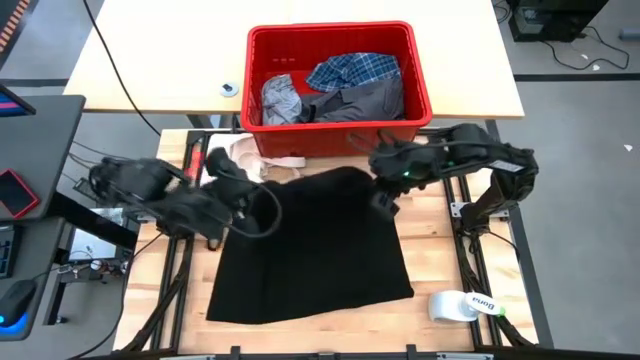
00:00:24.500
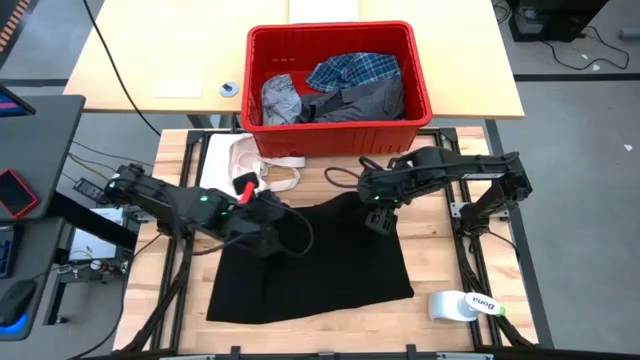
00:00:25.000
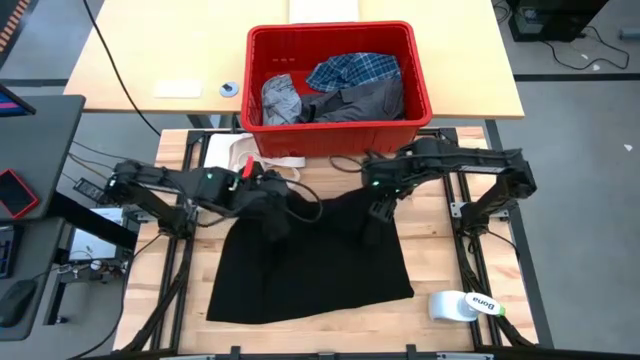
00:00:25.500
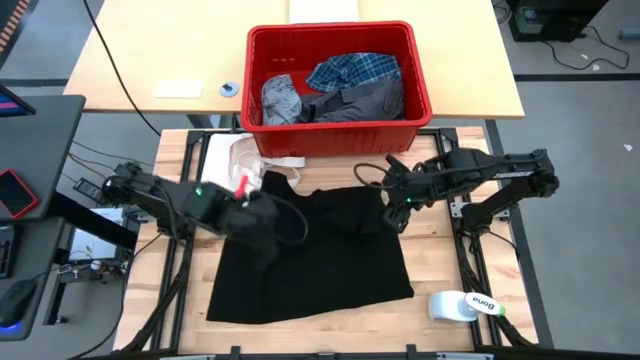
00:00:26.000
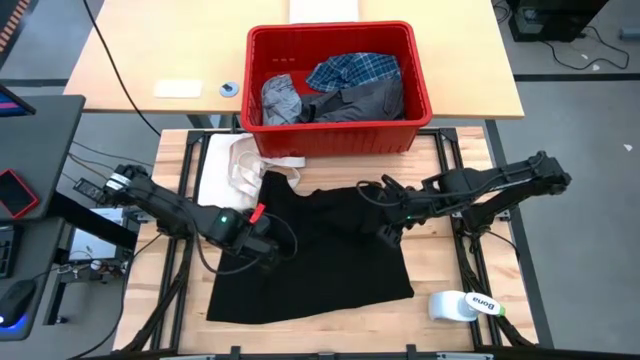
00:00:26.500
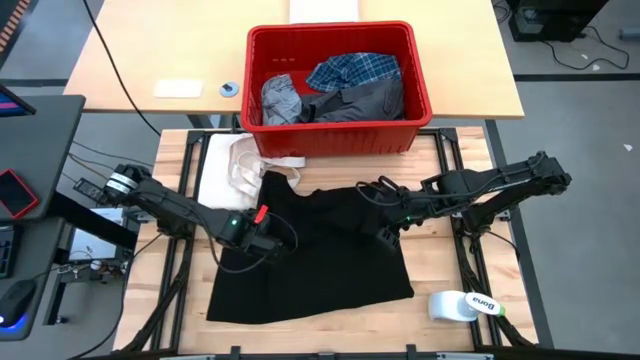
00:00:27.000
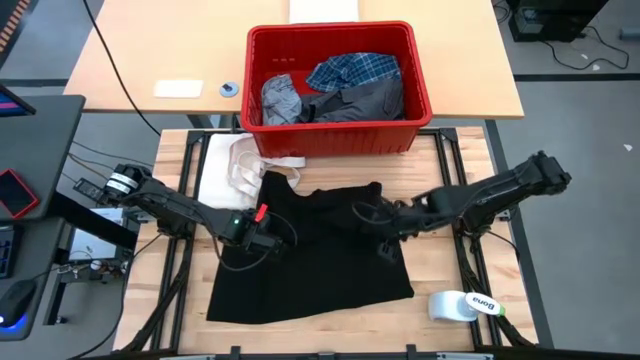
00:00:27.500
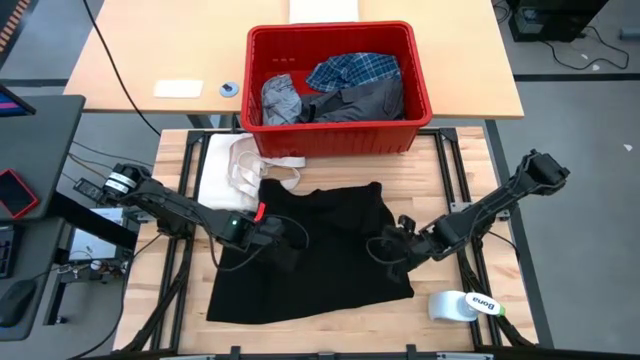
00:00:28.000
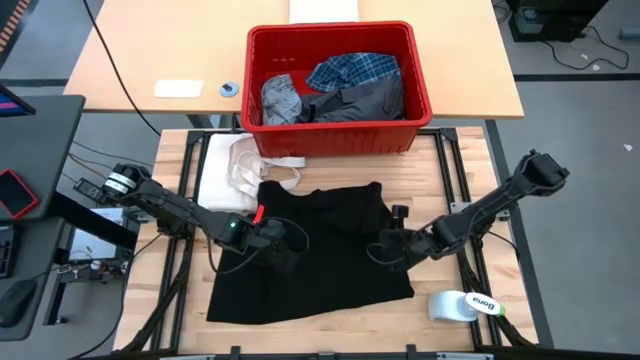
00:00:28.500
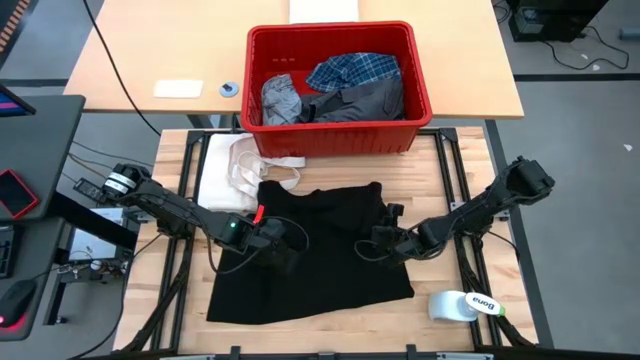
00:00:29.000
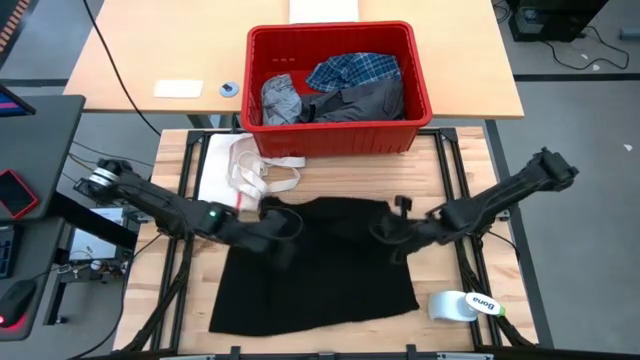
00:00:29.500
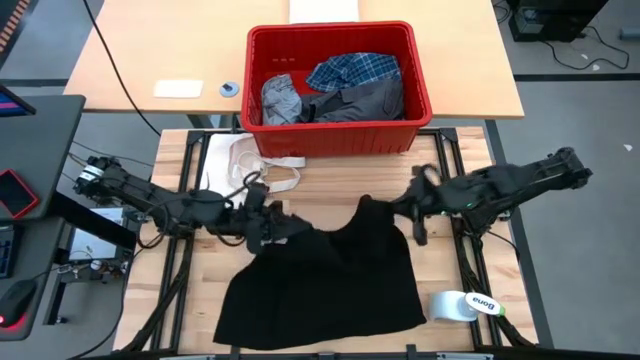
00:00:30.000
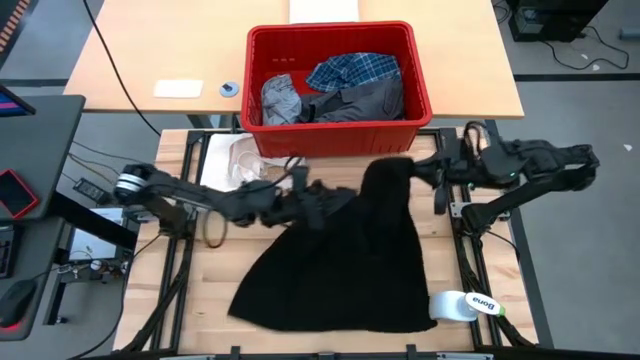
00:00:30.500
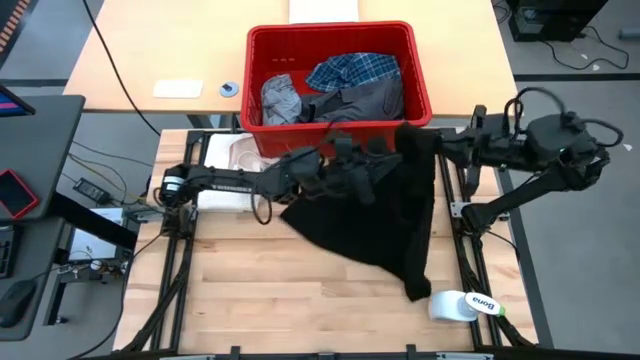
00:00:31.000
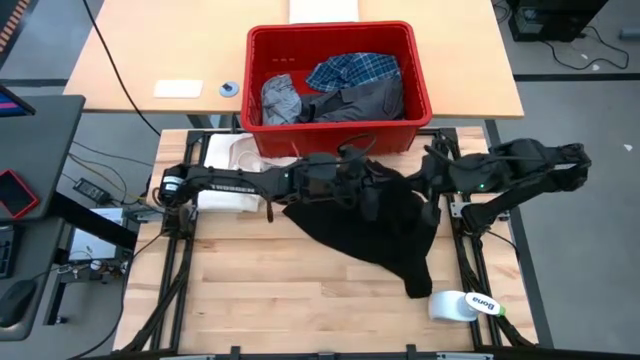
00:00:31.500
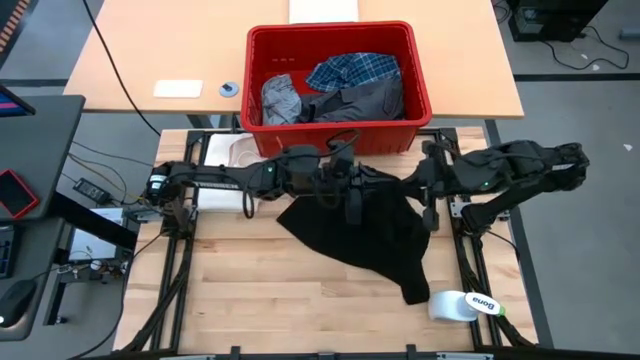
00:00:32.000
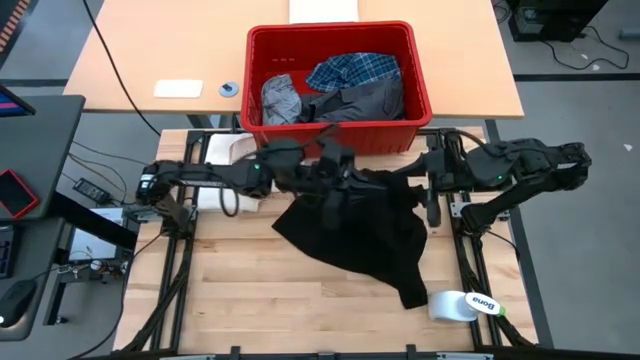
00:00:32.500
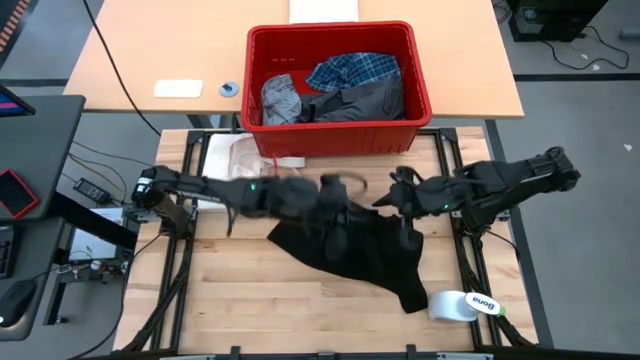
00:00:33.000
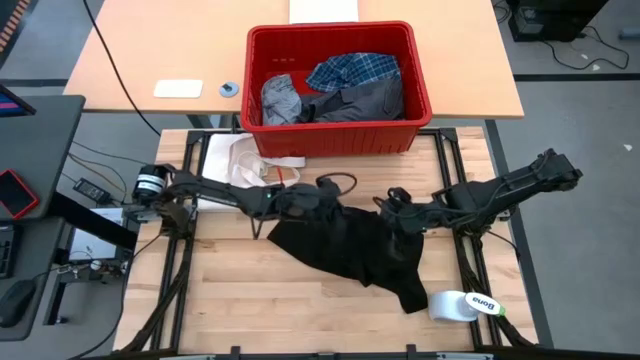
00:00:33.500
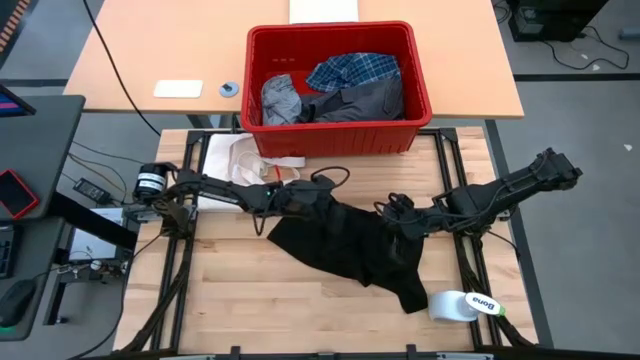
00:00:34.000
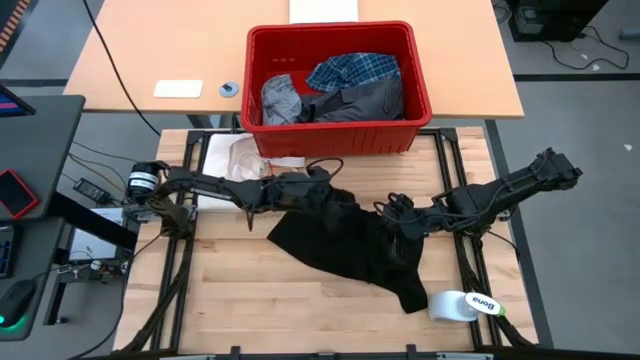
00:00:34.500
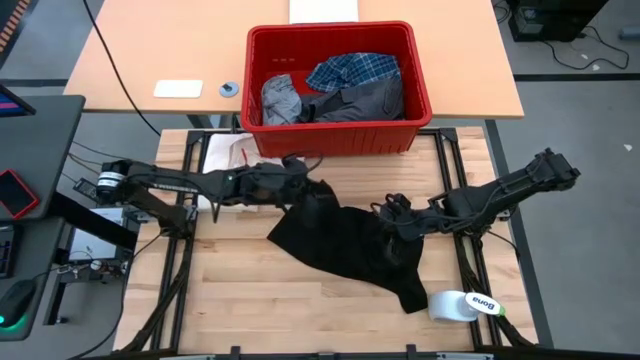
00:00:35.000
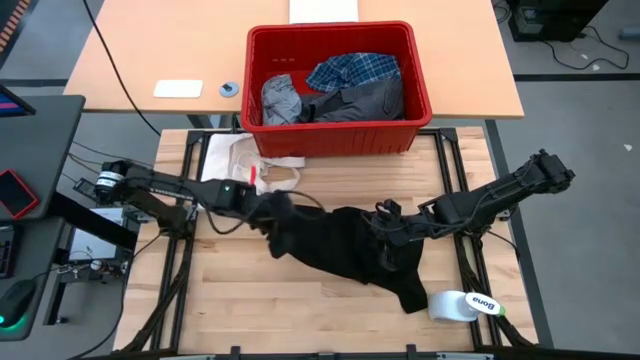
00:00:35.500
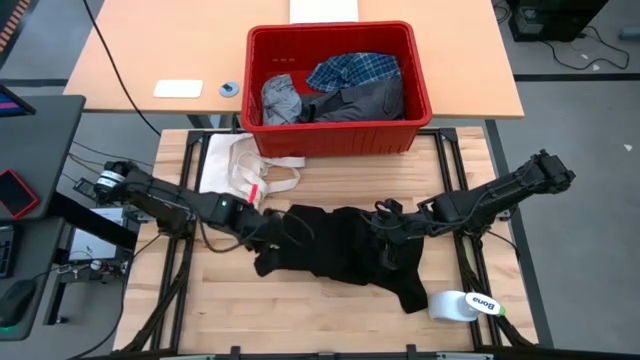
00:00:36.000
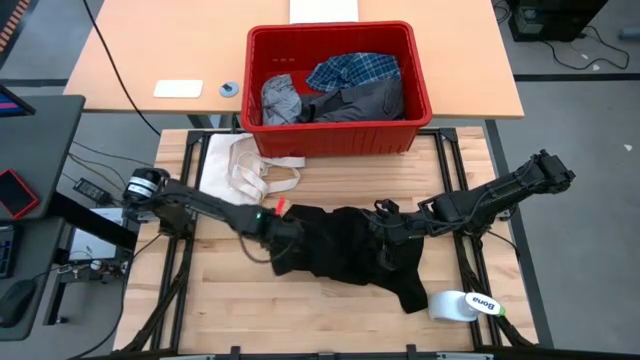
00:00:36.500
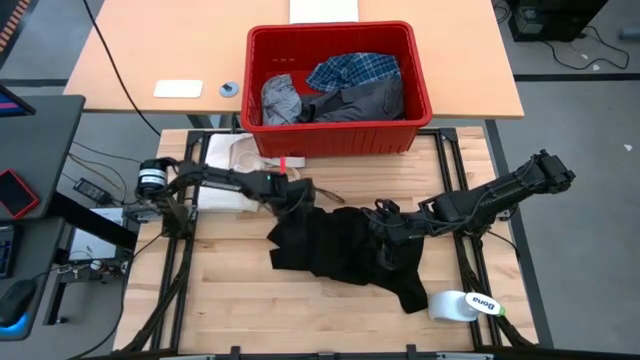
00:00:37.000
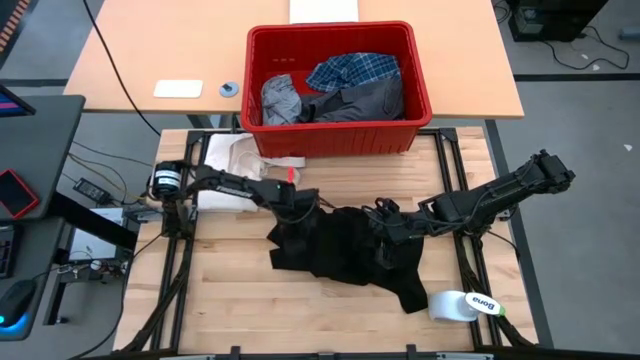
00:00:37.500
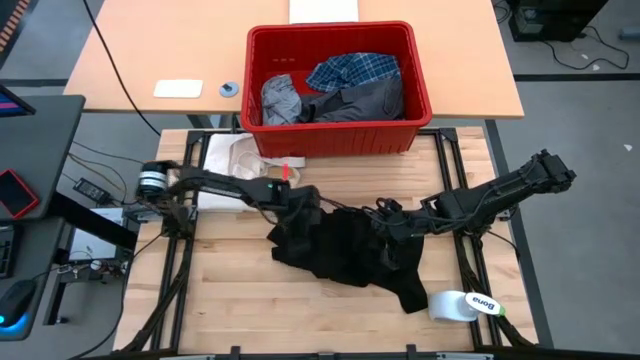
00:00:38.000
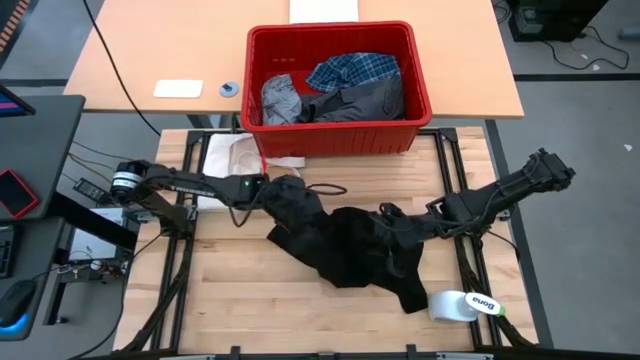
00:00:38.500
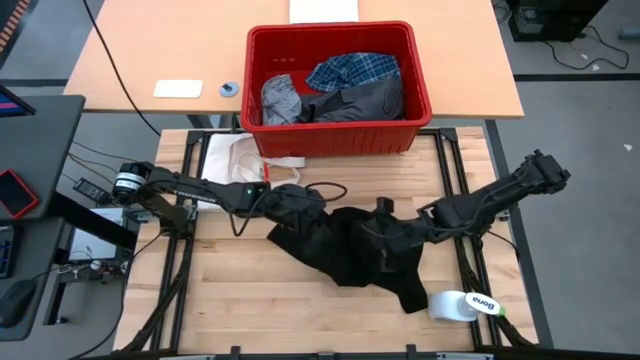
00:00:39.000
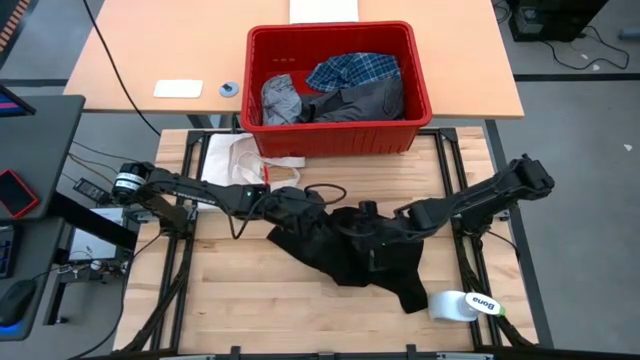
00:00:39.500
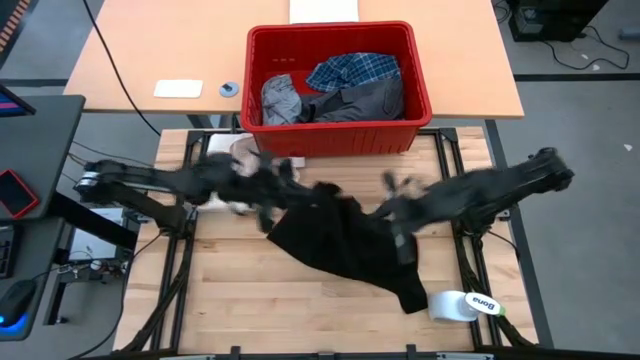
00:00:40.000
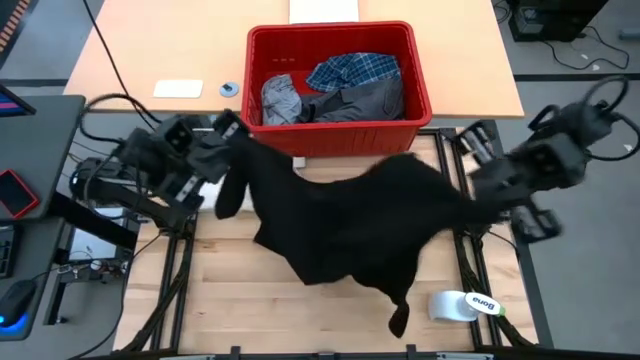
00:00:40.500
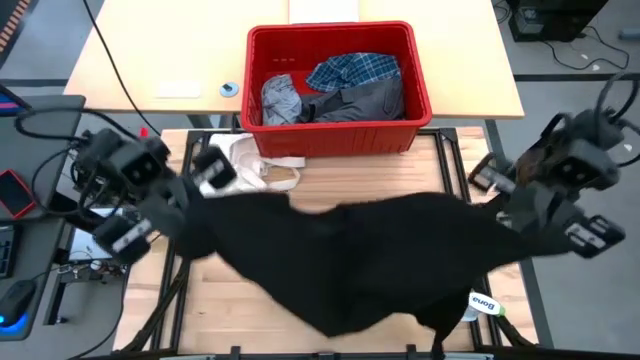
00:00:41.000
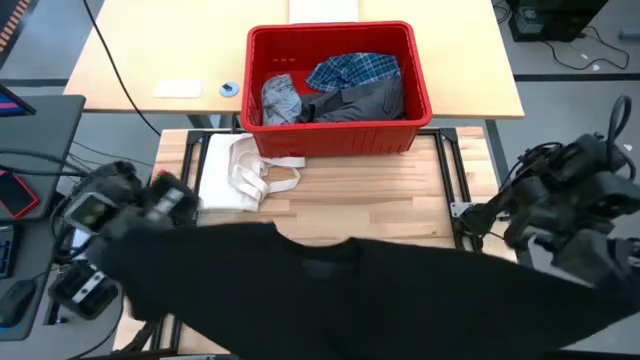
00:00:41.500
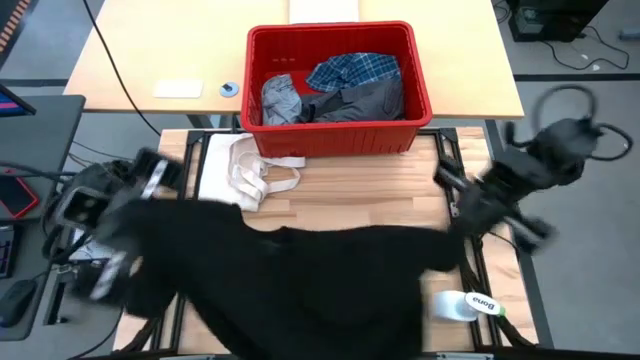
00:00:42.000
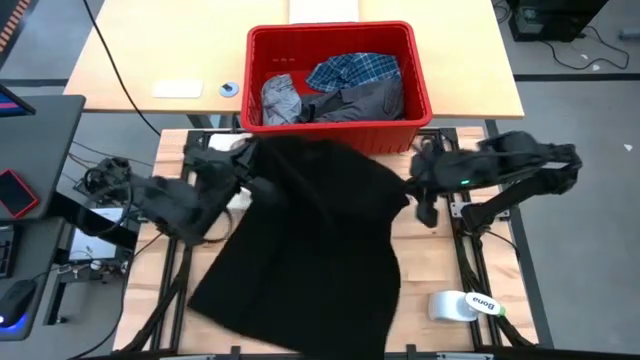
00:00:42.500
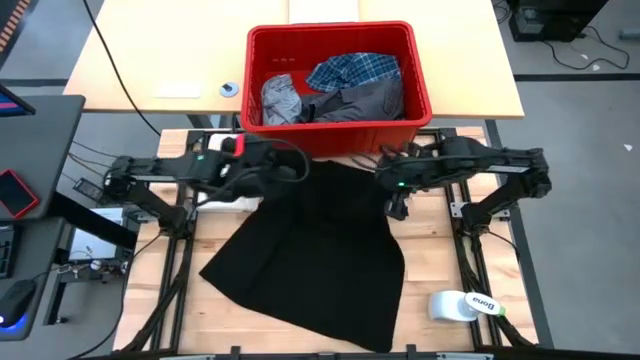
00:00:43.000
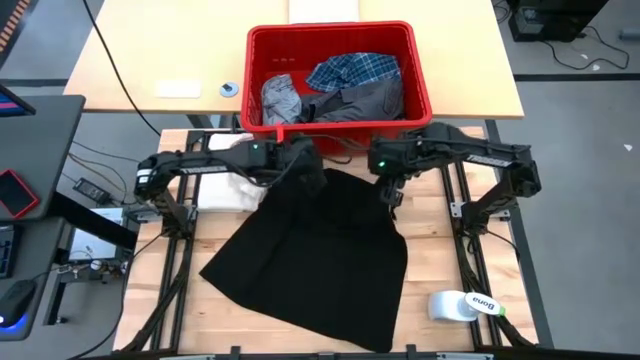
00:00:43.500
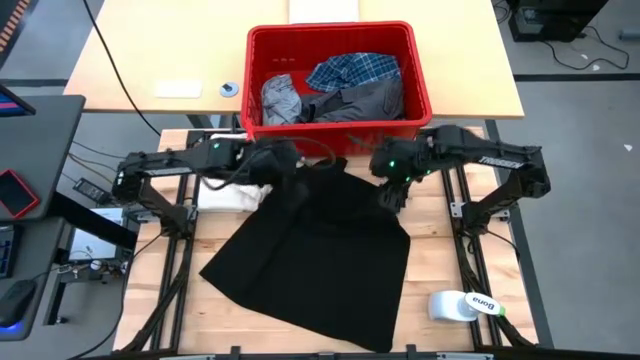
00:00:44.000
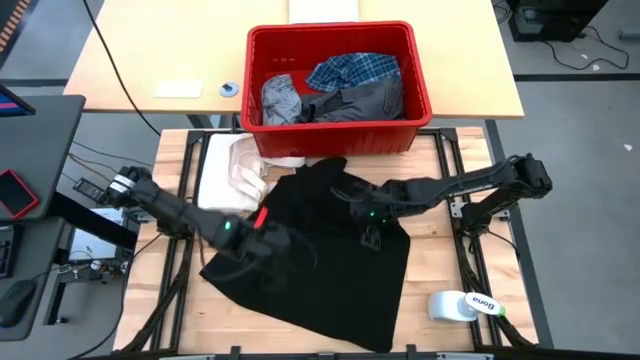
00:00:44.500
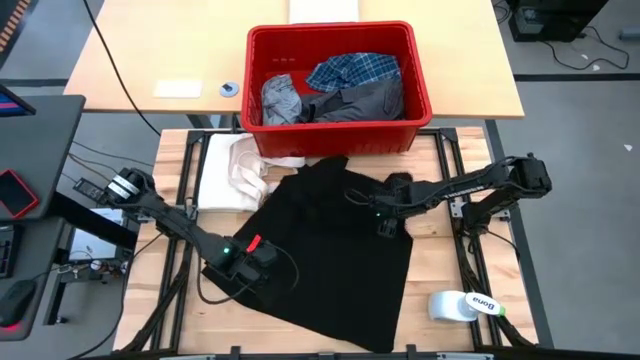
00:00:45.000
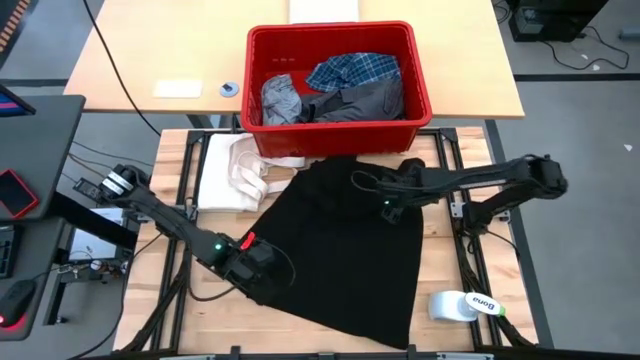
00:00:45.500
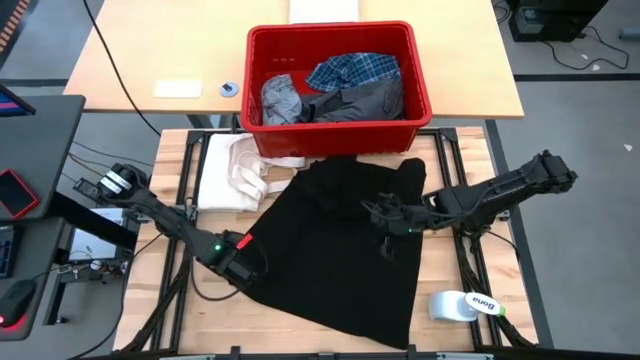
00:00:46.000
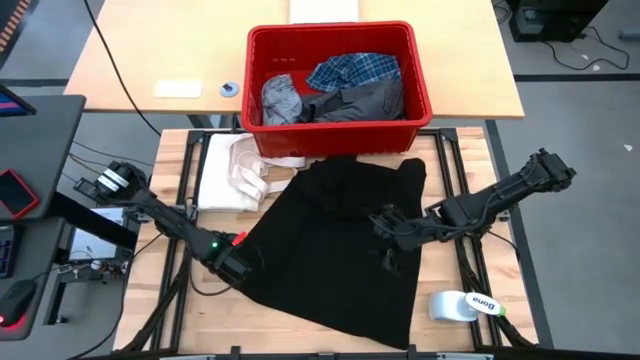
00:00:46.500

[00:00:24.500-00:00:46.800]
Task: Fold Laundry from Bin
Fold the black shirt
